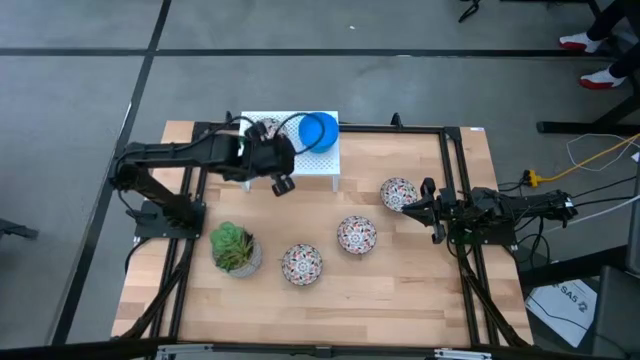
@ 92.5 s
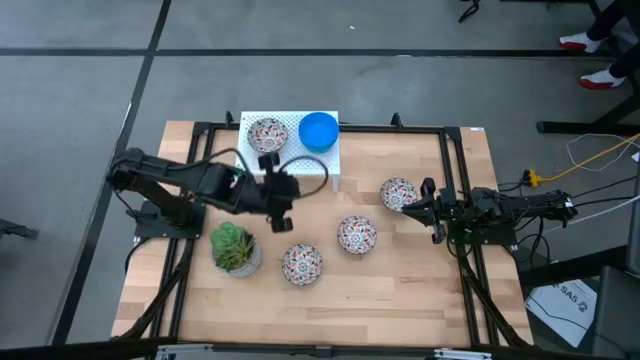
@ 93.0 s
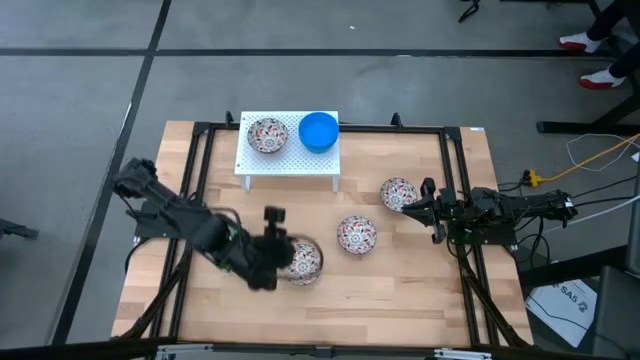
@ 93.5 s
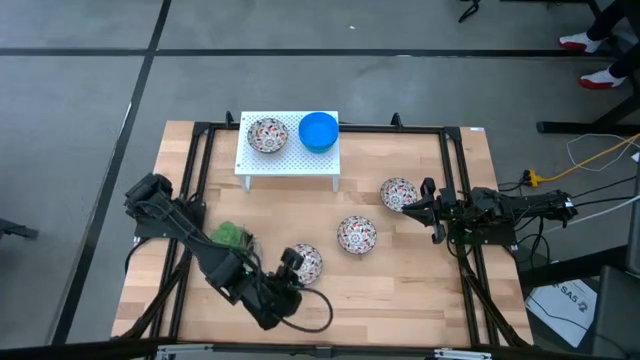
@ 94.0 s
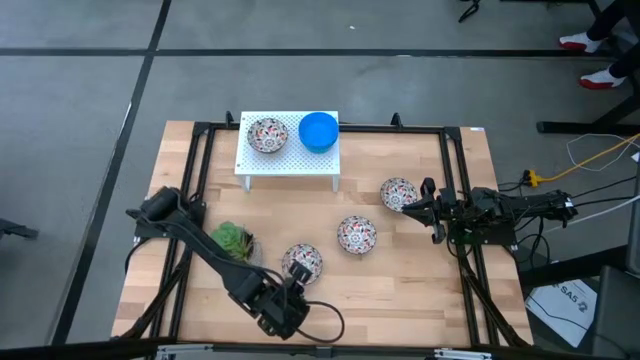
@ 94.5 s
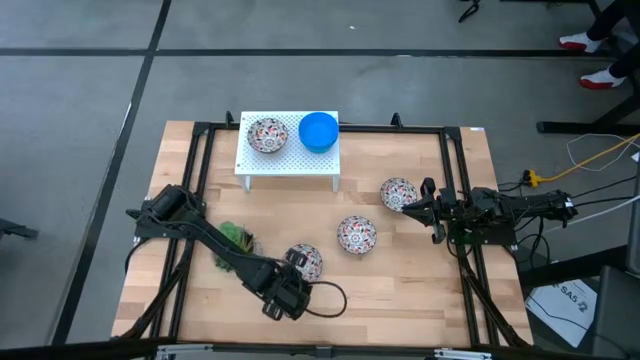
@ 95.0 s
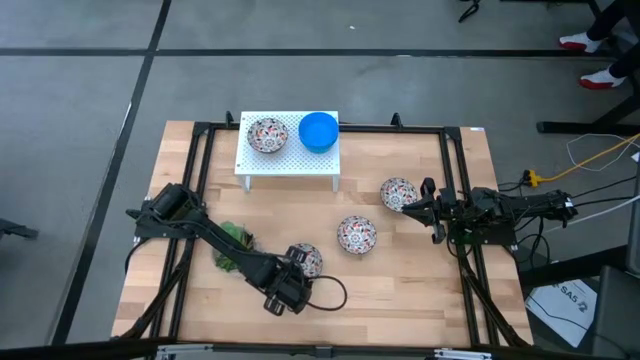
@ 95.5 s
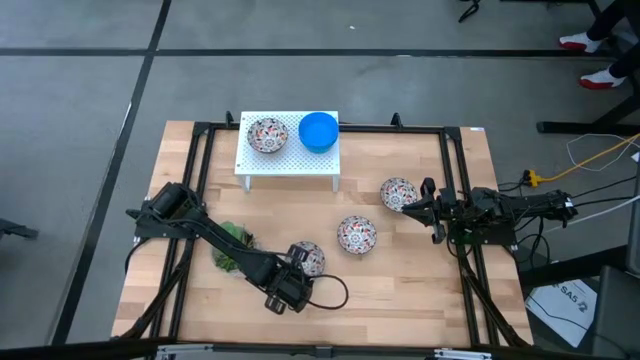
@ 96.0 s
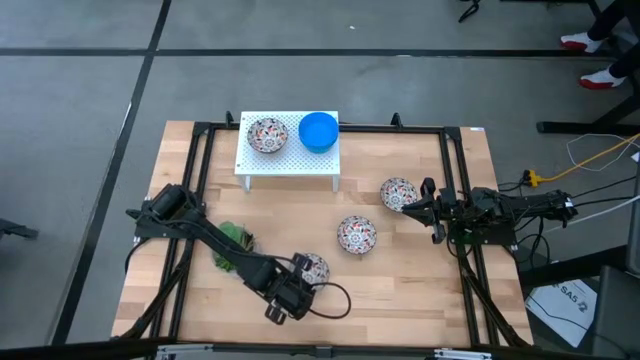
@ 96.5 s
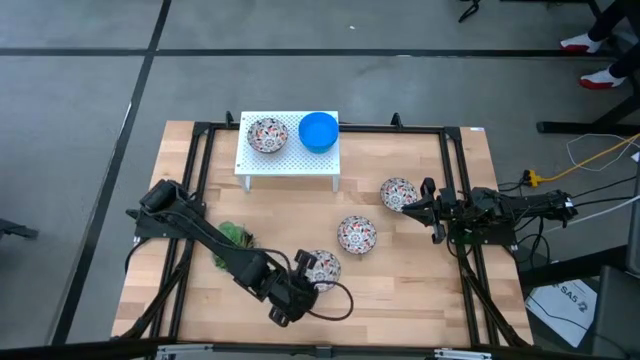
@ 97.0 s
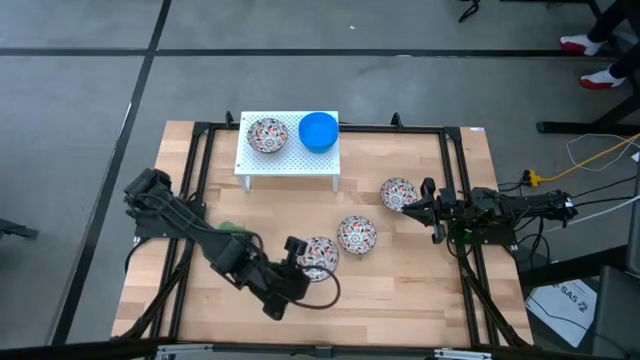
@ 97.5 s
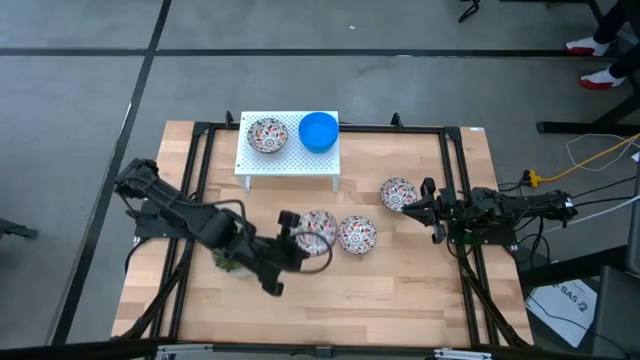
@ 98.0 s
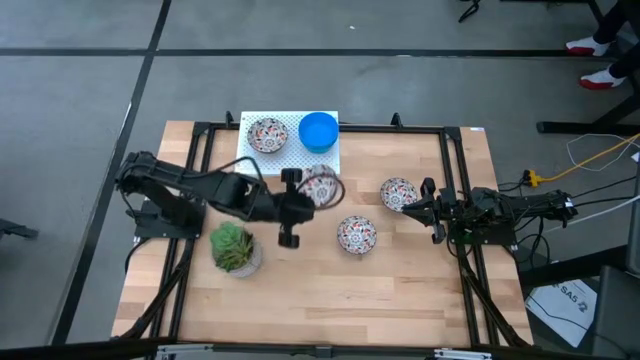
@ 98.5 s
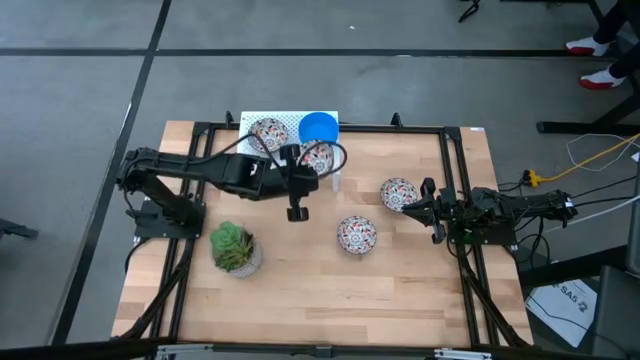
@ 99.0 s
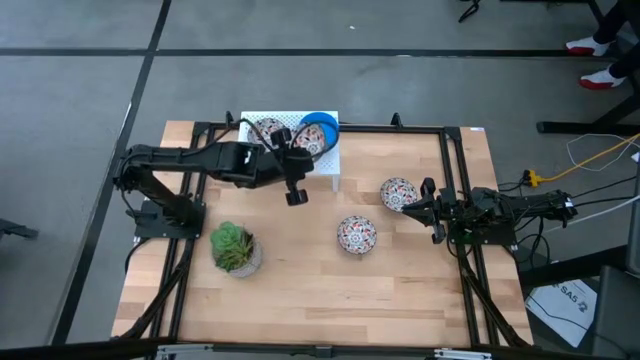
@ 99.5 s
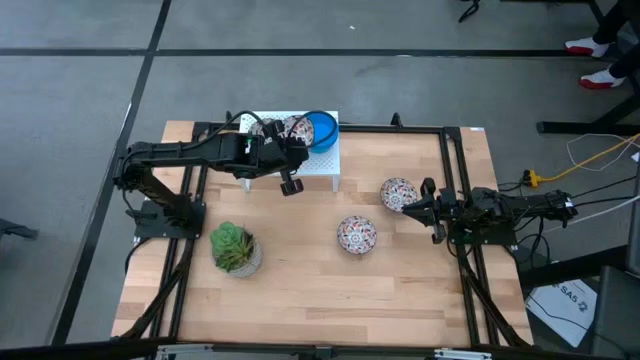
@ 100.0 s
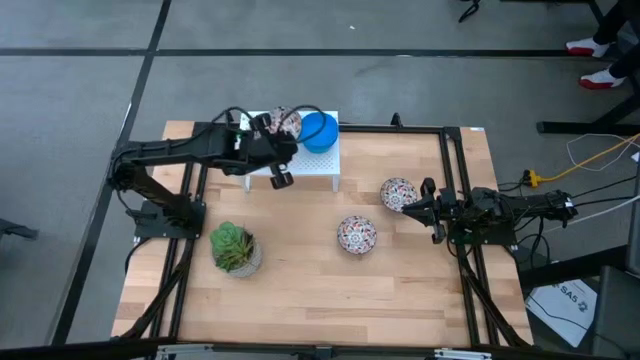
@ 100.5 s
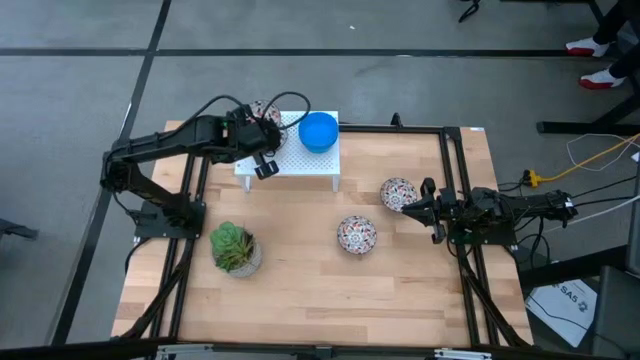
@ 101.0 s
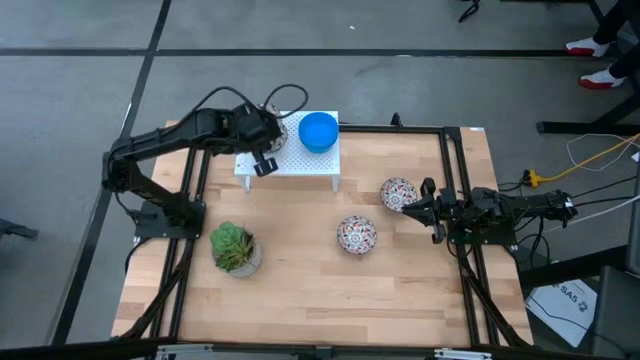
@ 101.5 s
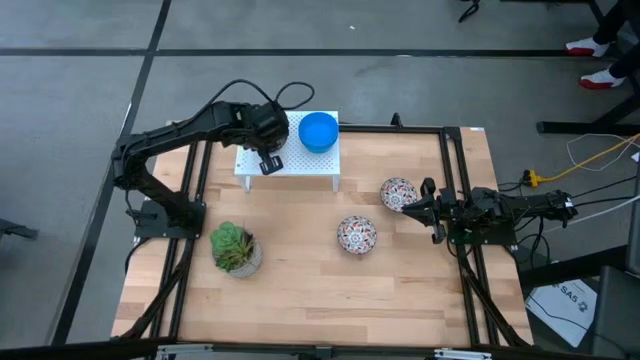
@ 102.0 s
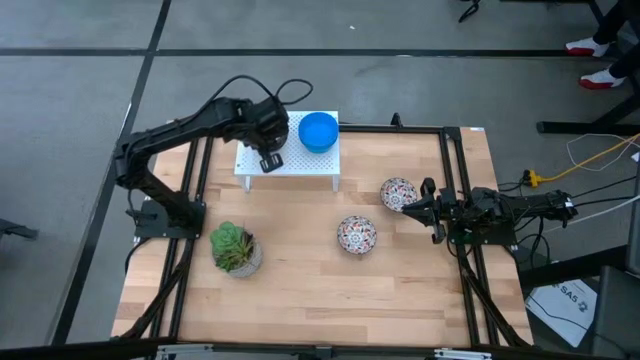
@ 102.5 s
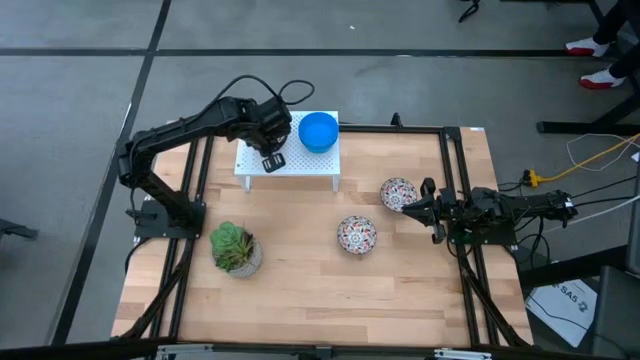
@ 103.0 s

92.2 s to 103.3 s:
Task: Pick & Place Mini bowls
Stack the white patterned bowl on the white patterned bowl on the shelf

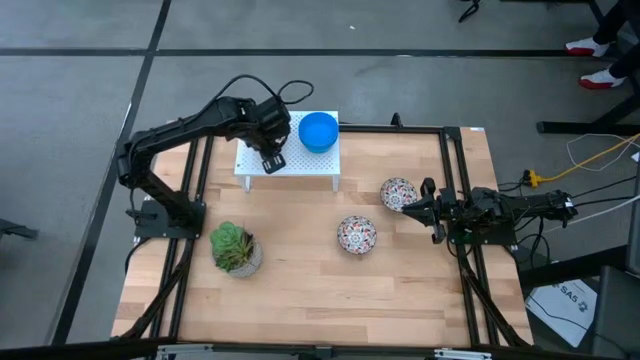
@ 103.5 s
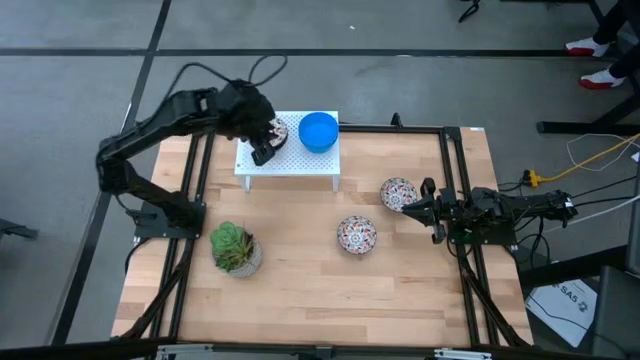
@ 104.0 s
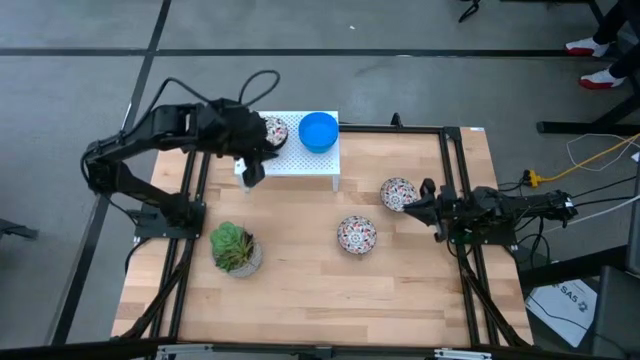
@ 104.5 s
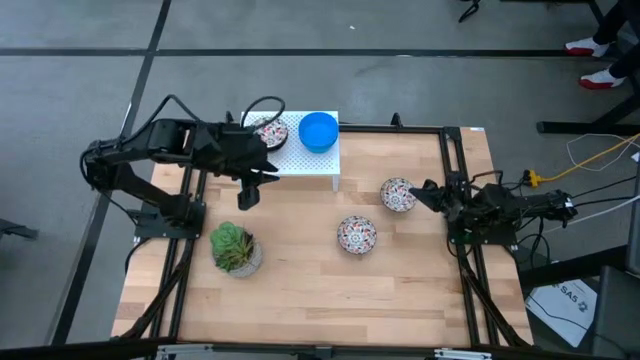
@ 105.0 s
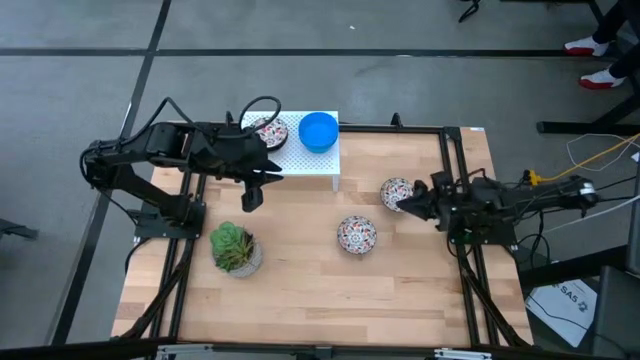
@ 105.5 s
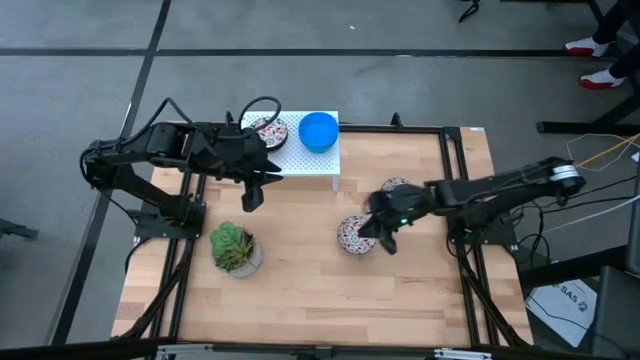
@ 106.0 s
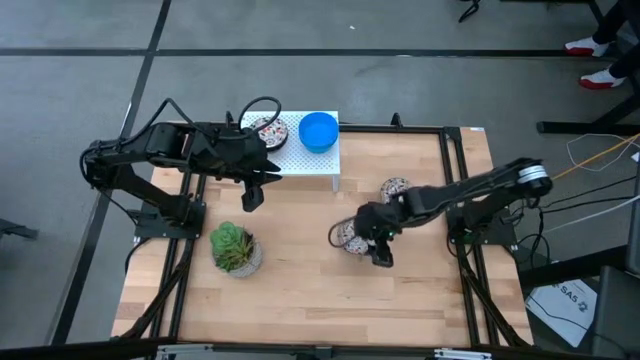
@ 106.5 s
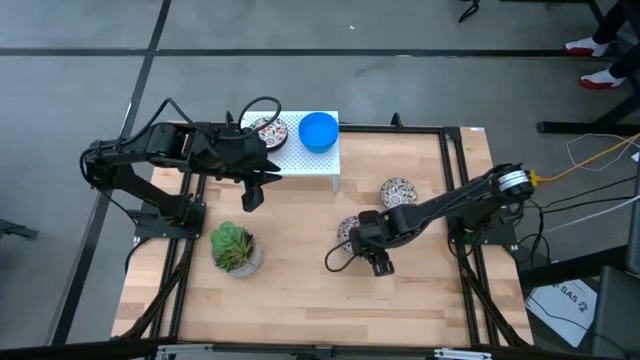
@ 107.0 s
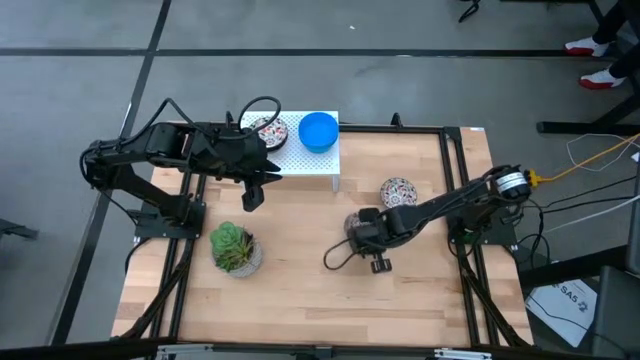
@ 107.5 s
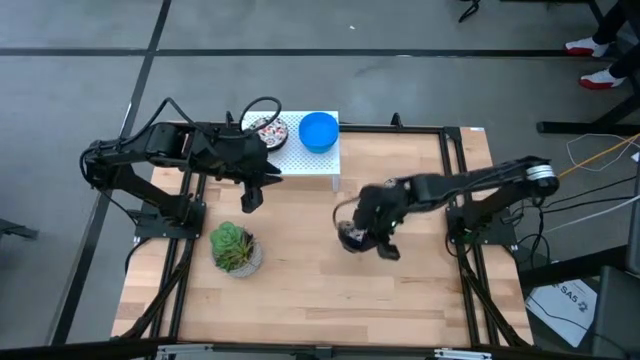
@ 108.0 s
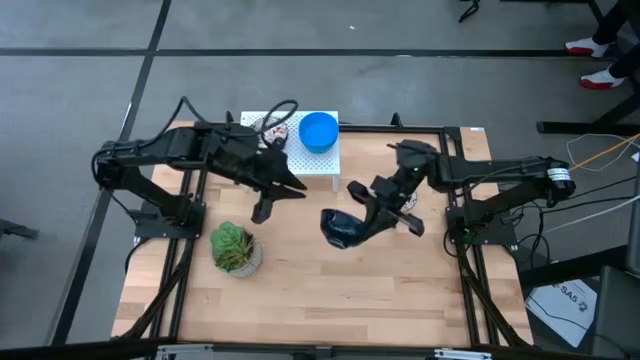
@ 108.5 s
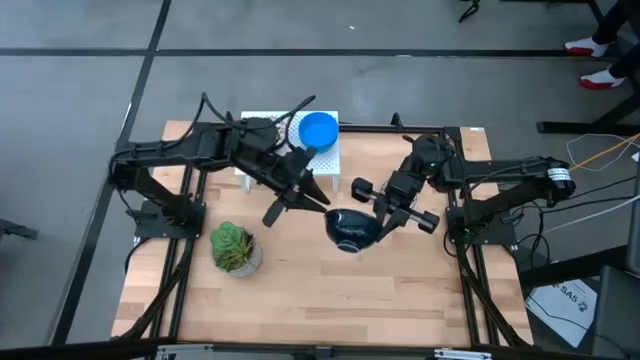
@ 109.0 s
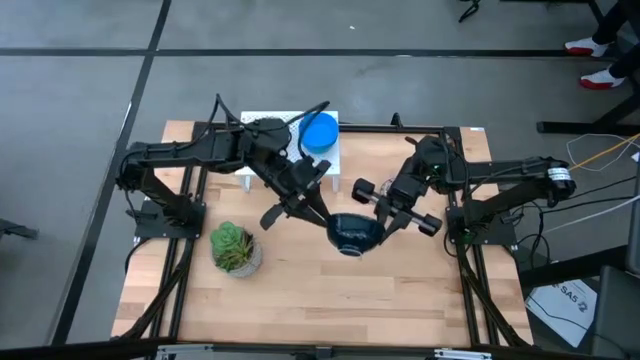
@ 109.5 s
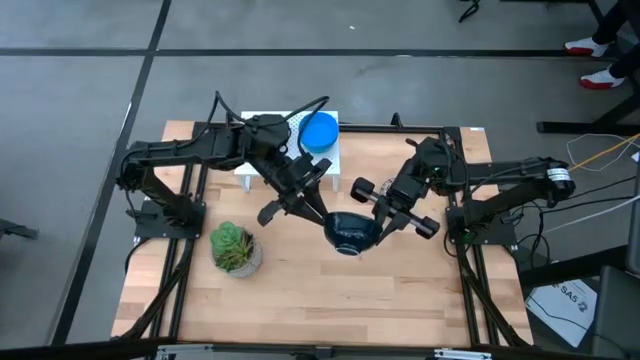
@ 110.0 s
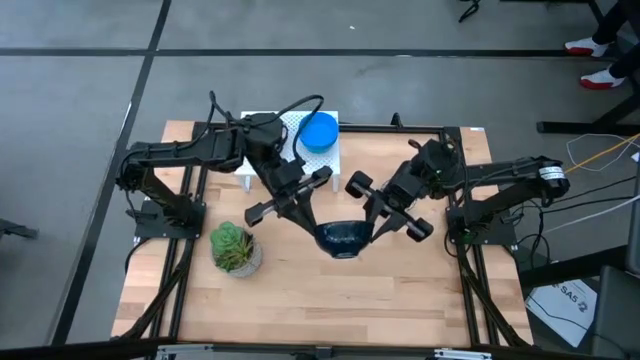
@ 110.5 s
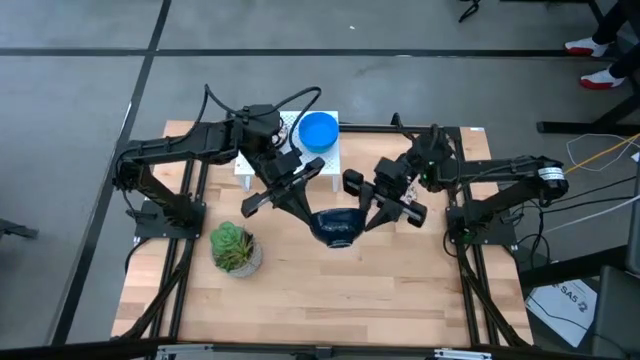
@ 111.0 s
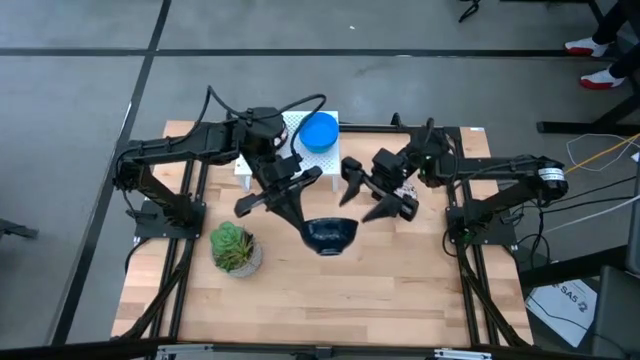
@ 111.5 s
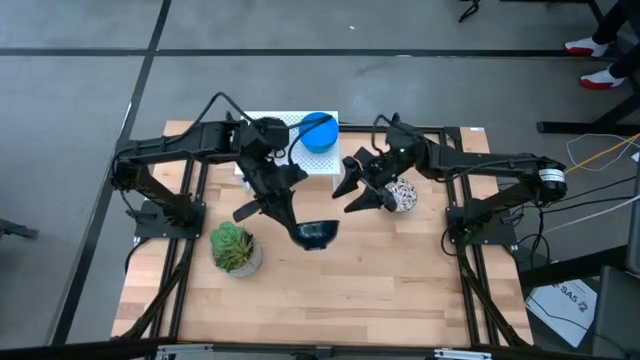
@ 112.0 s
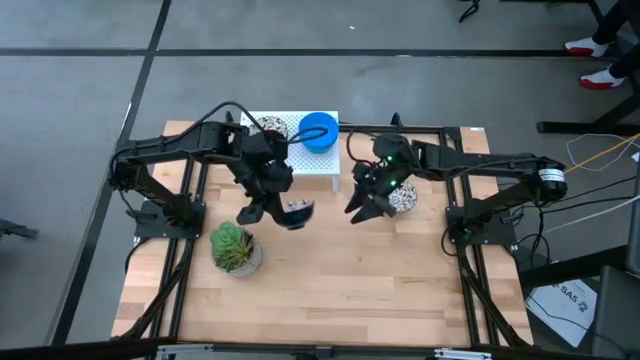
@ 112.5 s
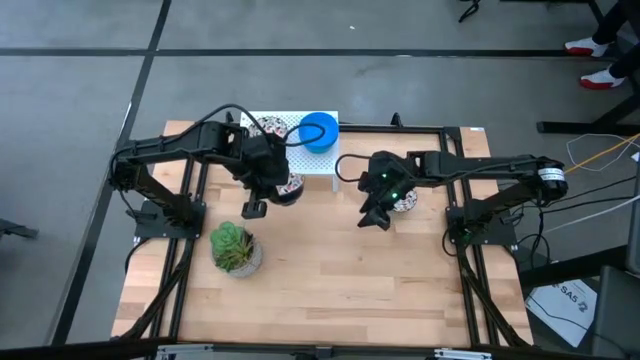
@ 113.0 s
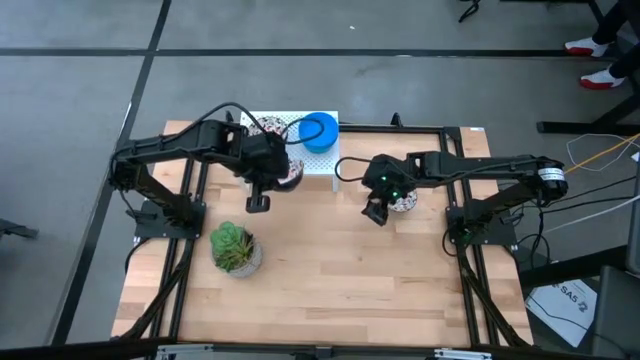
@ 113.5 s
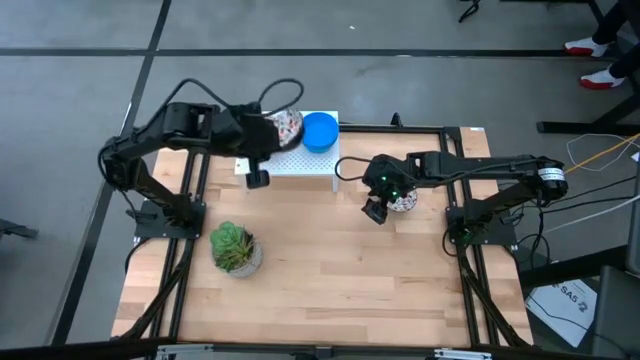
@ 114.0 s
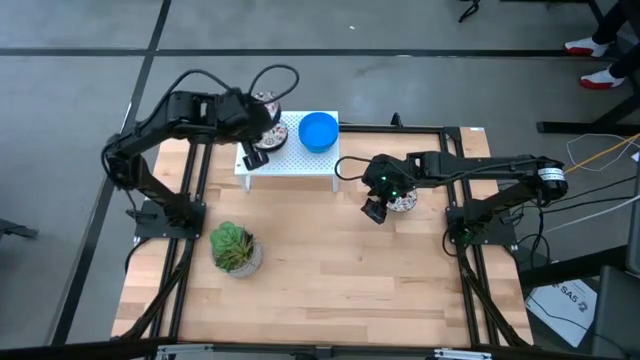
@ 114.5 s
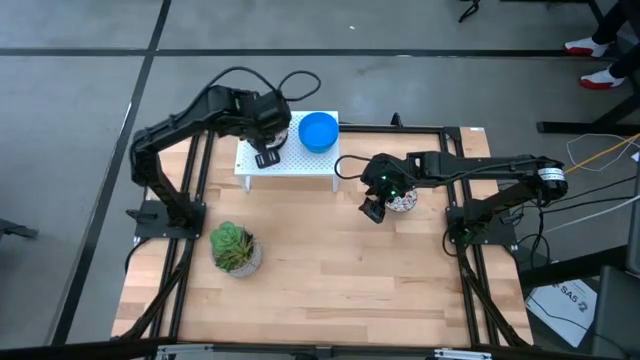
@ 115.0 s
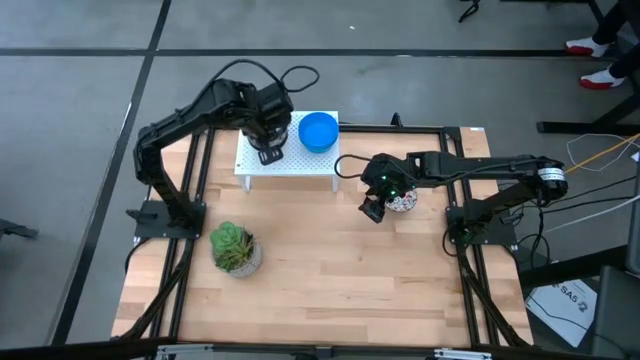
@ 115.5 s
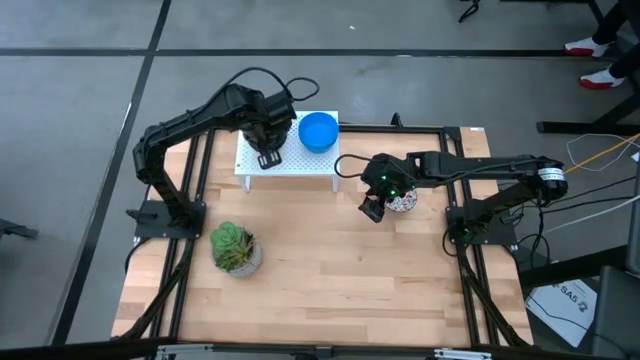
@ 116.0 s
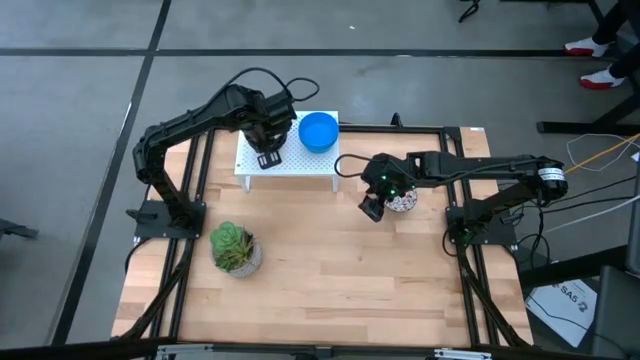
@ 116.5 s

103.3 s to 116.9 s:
Stack the white patterned bowl on the white patterned bowl on the shelf
